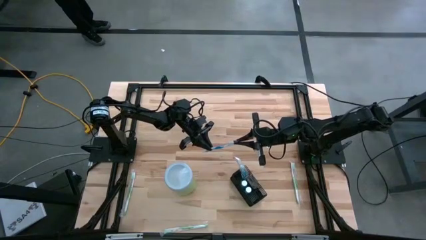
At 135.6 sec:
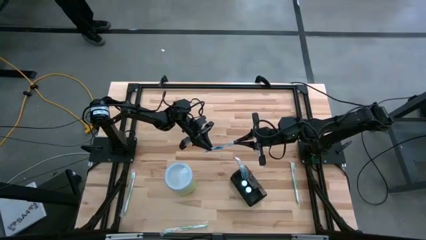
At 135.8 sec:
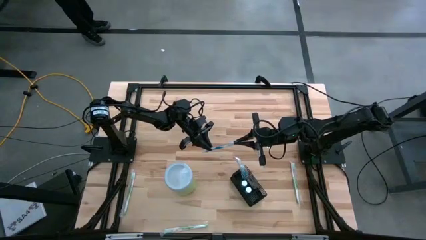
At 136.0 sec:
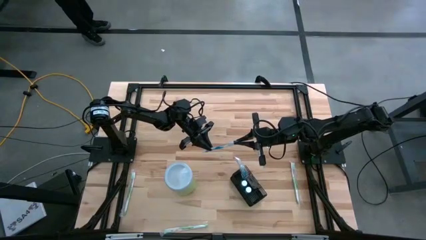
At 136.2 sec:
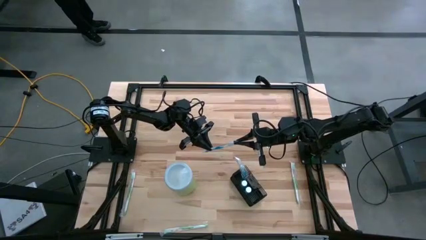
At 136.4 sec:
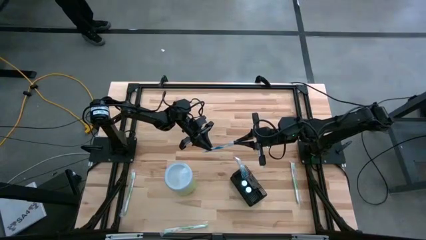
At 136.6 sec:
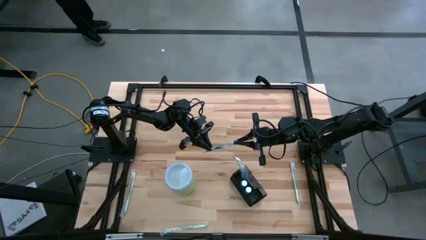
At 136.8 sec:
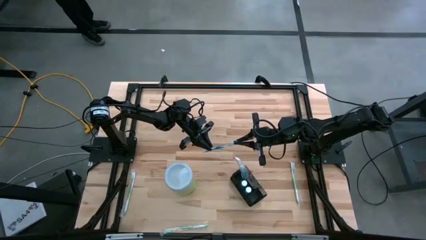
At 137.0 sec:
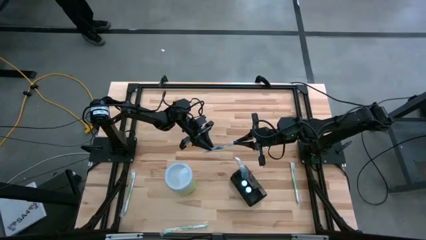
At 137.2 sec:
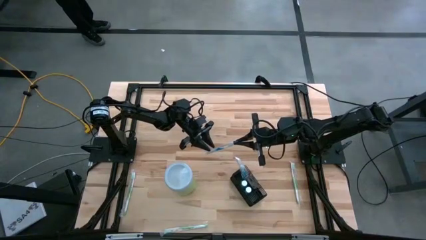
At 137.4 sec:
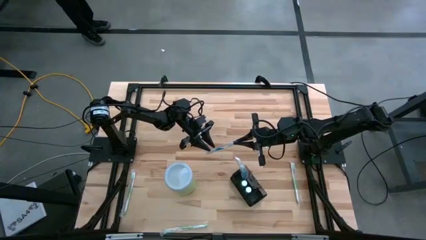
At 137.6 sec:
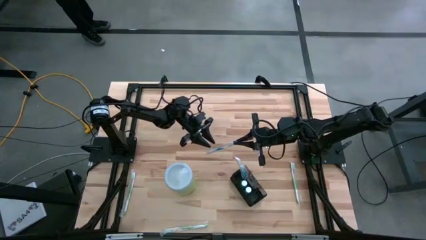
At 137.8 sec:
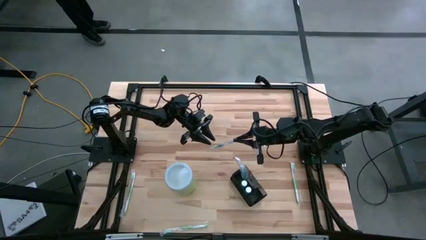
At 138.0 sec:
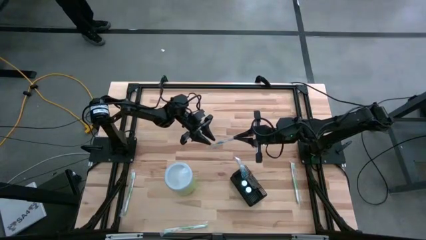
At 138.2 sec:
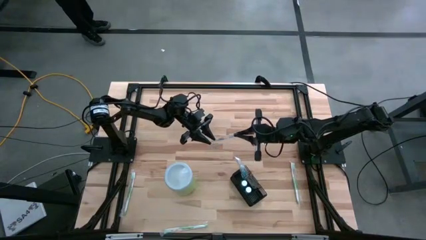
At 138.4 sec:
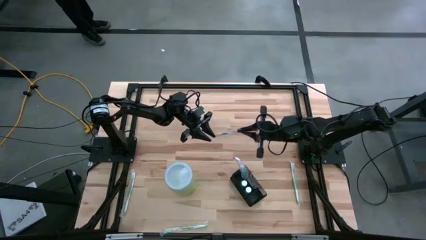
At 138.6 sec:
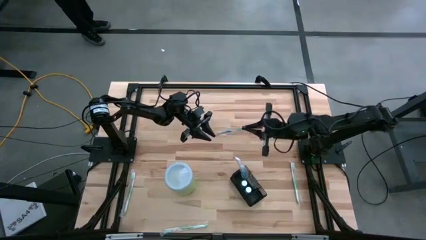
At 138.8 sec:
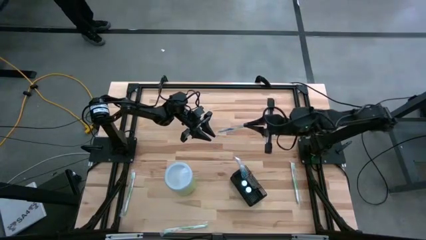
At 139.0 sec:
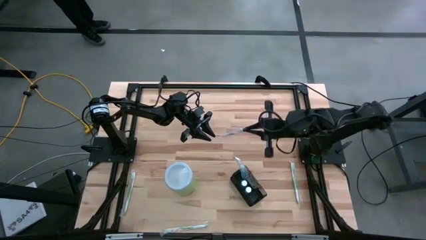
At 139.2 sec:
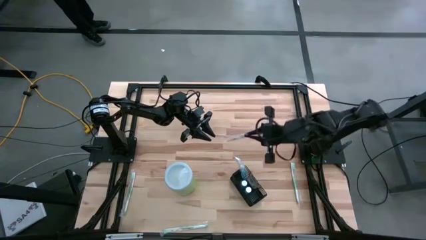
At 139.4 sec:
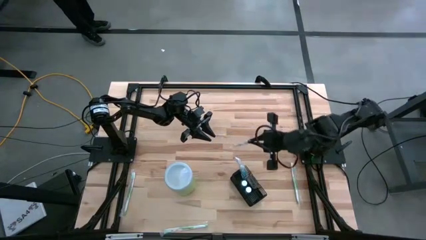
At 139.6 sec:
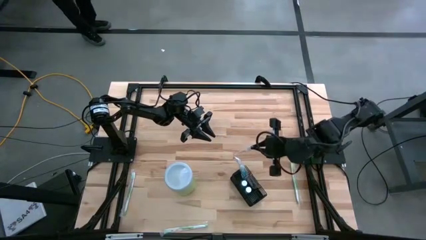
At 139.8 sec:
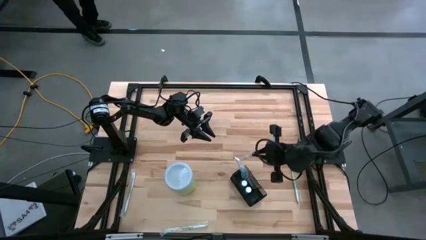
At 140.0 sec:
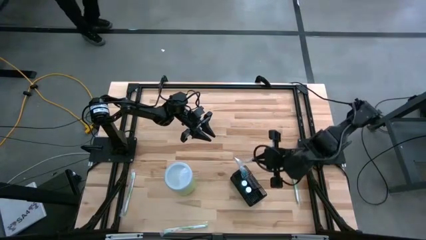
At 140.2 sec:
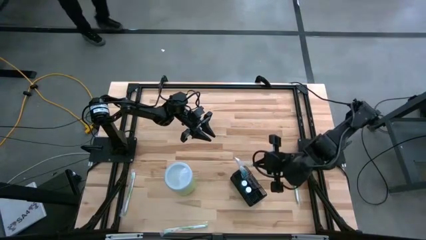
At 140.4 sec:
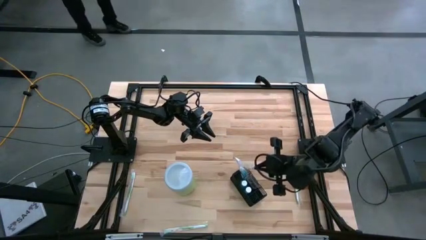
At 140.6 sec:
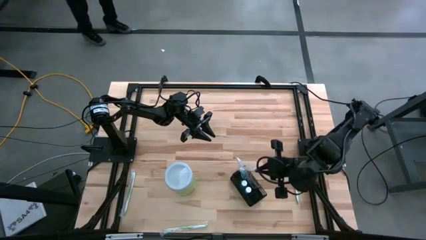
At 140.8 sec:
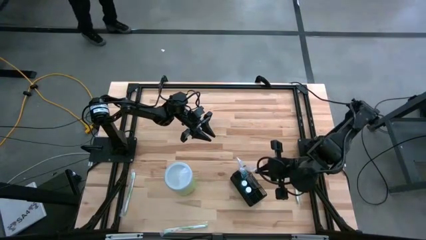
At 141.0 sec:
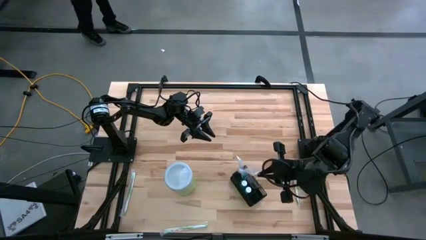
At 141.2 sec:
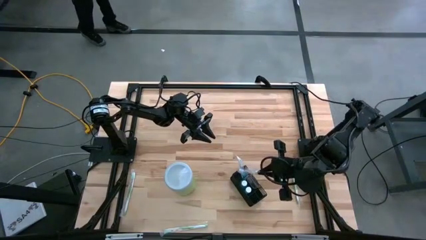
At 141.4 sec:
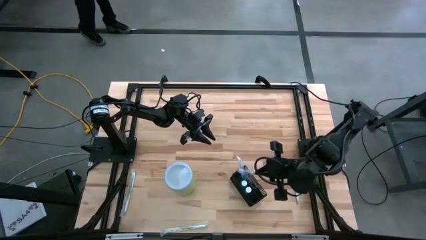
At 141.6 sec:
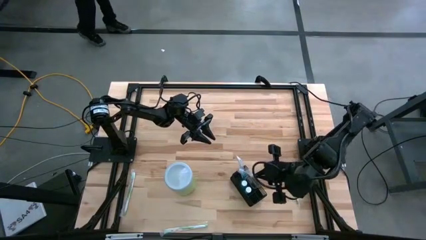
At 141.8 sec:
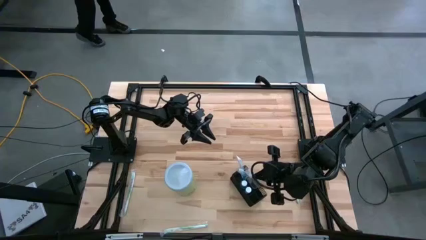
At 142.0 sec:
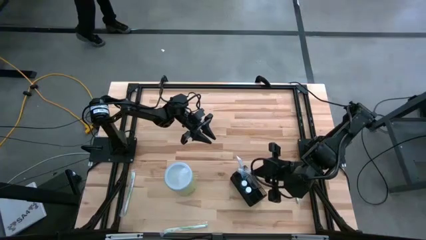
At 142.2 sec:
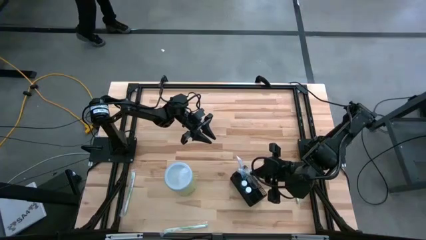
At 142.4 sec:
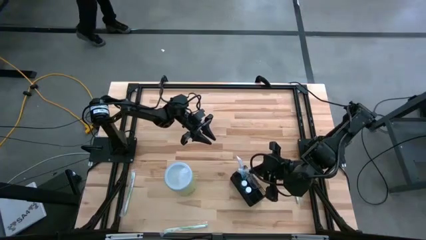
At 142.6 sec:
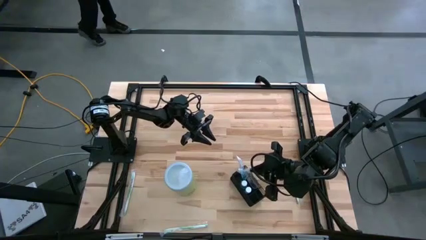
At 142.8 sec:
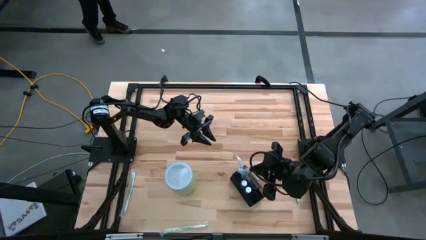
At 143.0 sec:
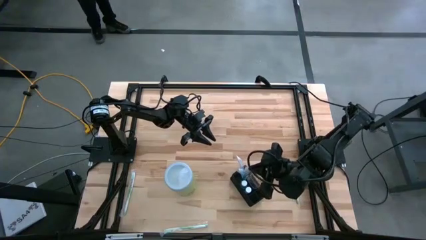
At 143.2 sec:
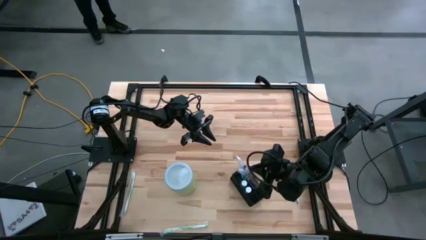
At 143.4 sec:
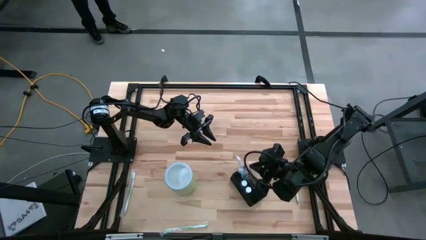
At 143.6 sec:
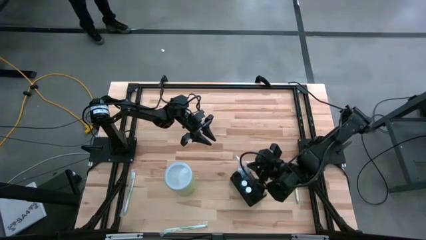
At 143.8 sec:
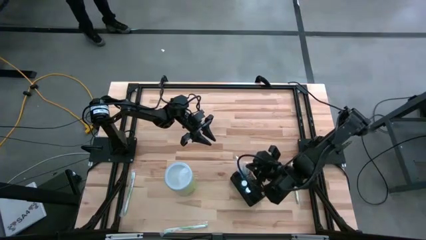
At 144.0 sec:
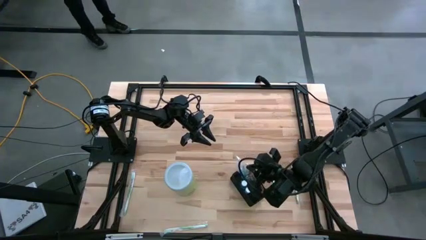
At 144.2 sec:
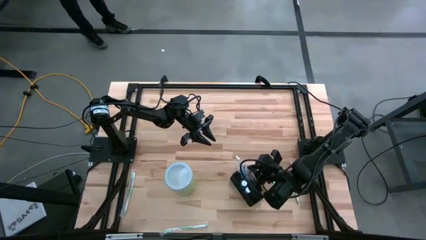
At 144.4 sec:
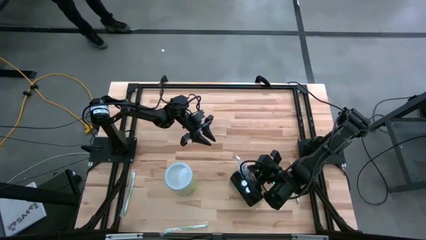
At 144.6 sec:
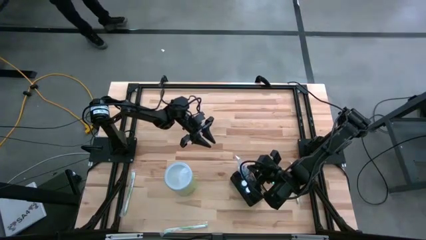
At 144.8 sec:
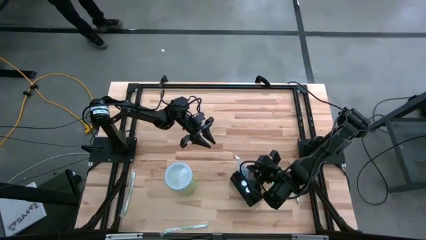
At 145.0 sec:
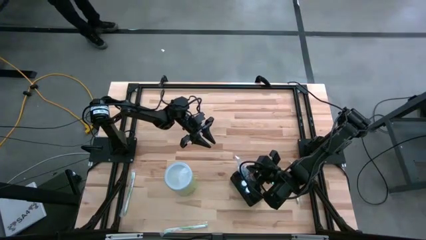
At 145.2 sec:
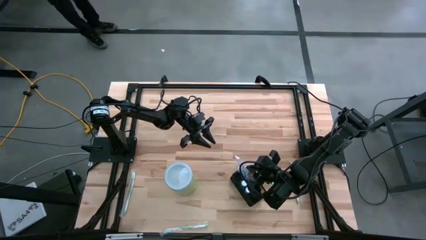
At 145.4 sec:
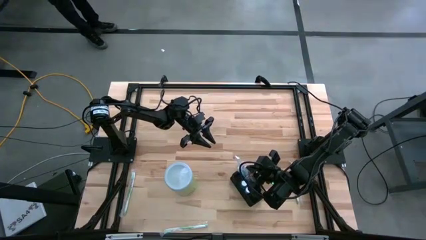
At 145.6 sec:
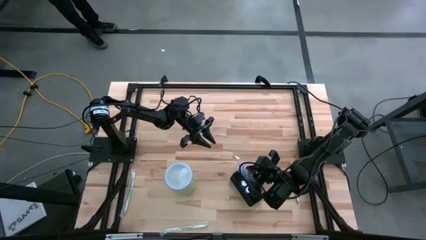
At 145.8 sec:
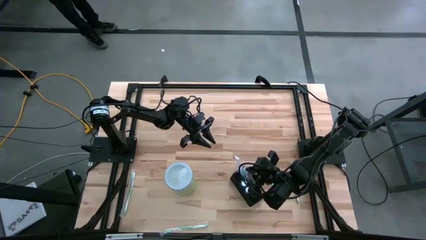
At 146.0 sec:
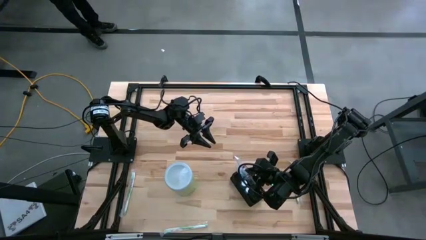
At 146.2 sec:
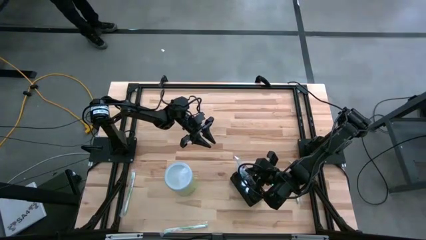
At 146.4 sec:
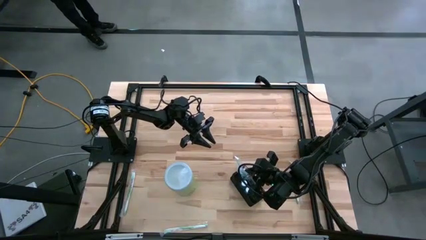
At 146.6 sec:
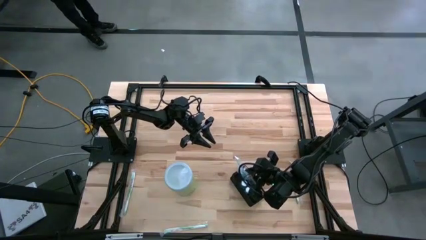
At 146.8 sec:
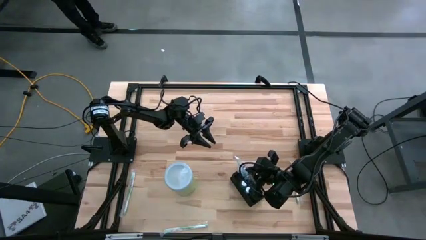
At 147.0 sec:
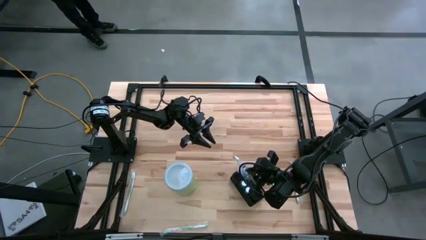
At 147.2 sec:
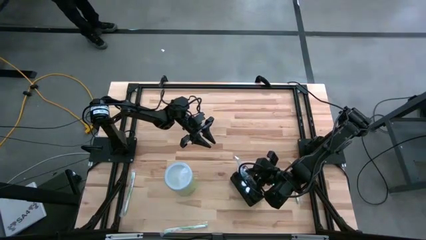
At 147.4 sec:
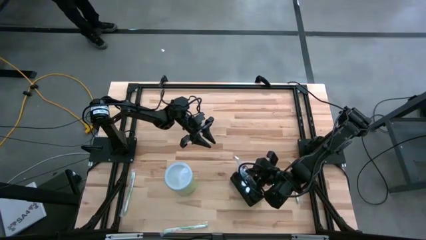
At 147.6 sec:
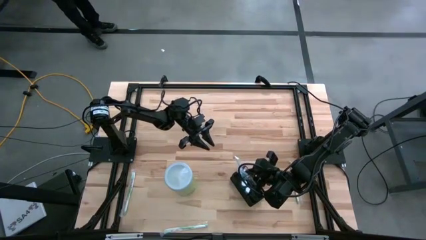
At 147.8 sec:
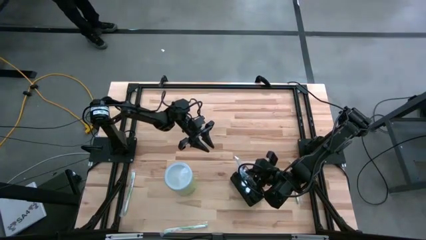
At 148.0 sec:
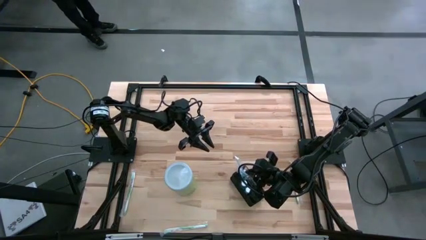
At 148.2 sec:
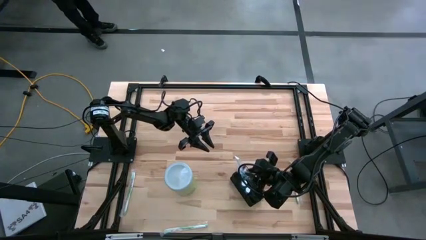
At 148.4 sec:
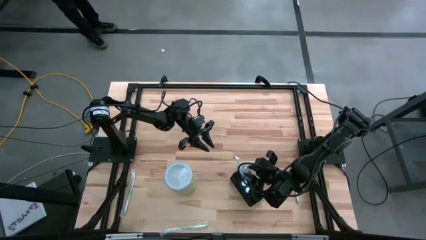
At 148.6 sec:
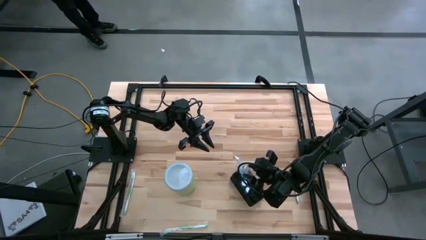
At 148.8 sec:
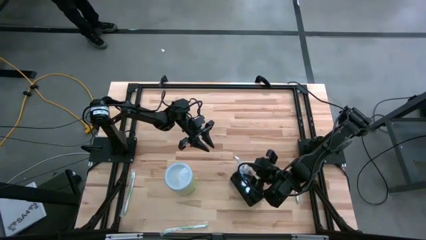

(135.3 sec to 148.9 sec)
Task: Pick & Place toothbrushing station
Put the blue toothbrush into the black mesh organizer

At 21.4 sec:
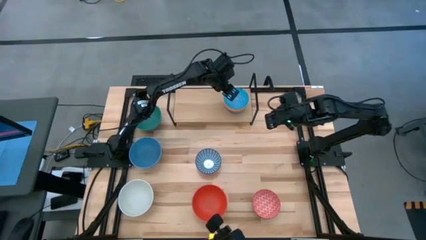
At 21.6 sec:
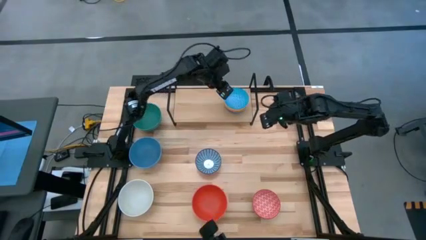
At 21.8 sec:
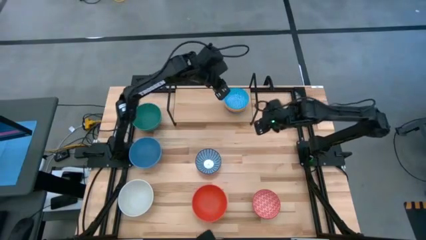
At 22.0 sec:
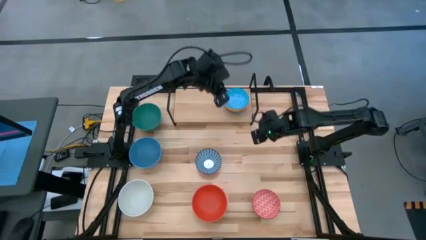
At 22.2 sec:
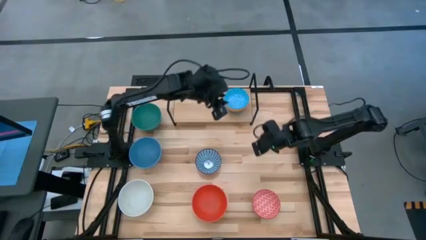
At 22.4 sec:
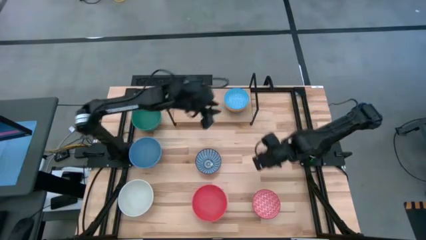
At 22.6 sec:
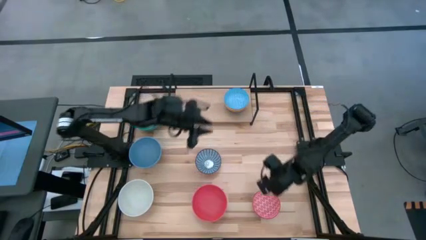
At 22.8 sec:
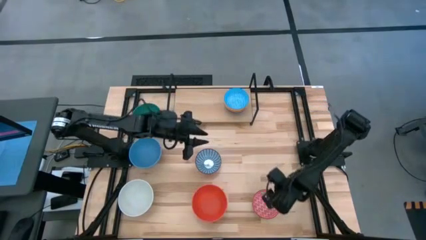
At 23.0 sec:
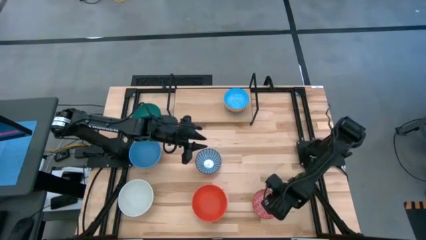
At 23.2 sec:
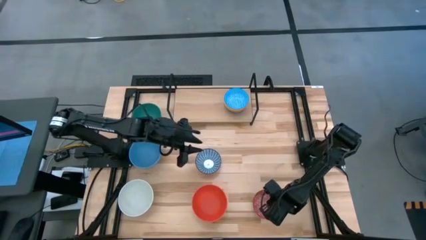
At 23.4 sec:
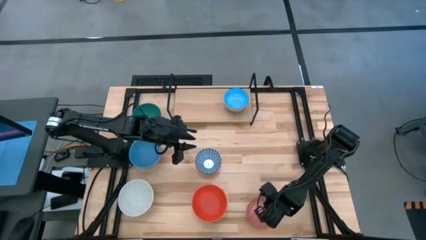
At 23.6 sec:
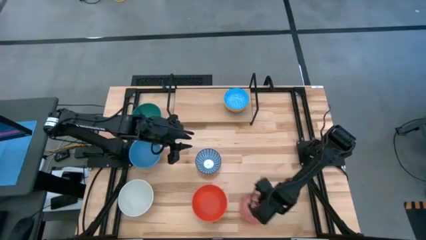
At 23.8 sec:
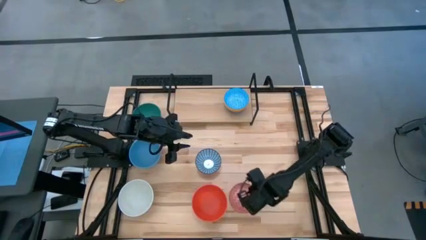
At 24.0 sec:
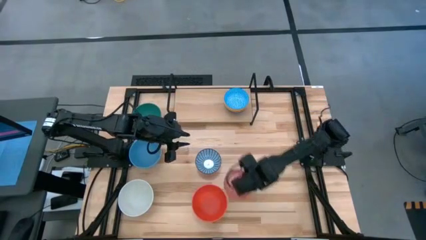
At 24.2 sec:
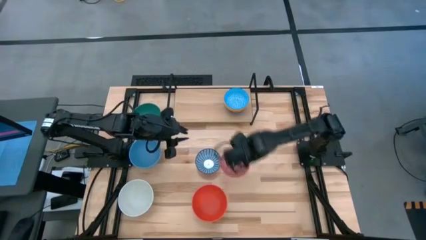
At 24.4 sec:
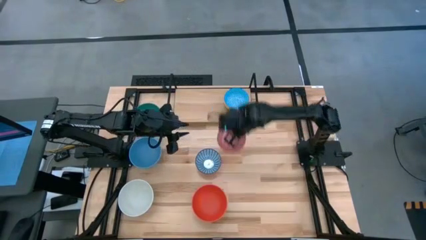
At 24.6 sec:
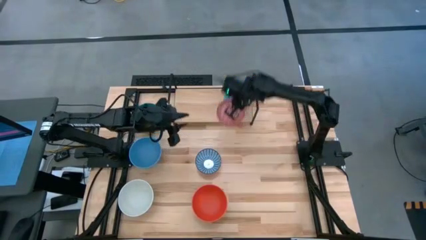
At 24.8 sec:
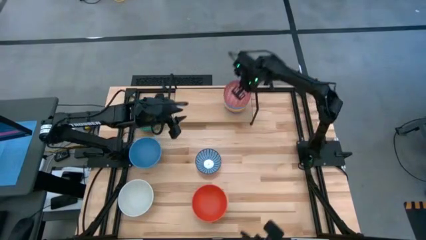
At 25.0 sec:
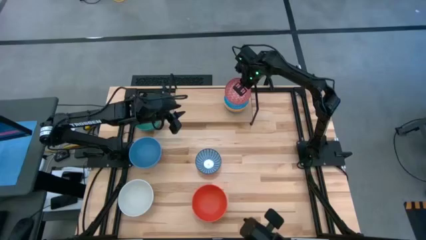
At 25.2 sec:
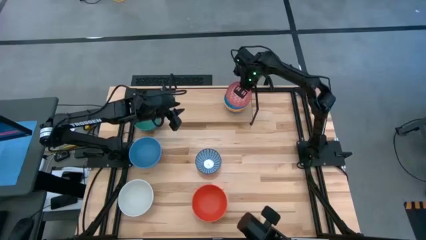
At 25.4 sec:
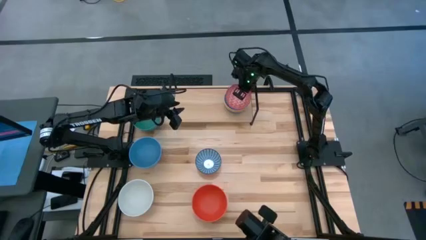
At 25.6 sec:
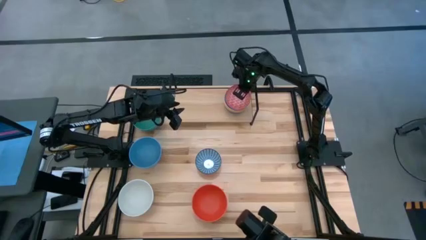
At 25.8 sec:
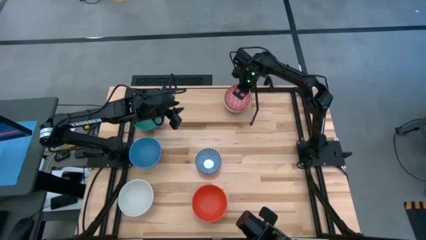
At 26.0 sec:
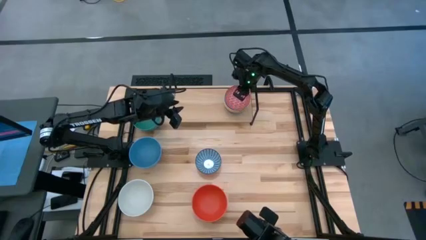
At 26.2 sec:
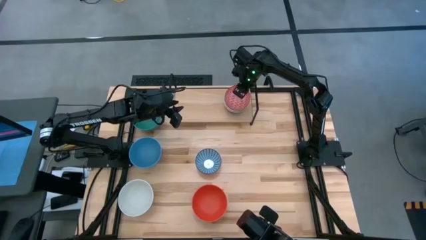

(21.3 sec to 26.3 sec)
Task: Place and stack bowls onto a shelf
Stack the red patterned bowl on top of the blue patterned bowl on the shelf
